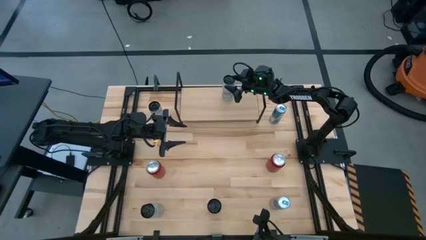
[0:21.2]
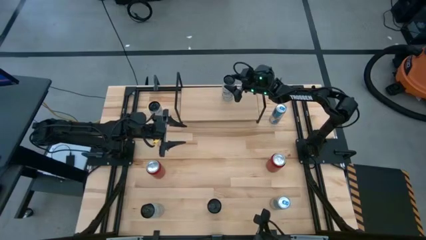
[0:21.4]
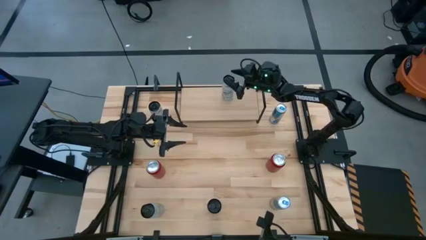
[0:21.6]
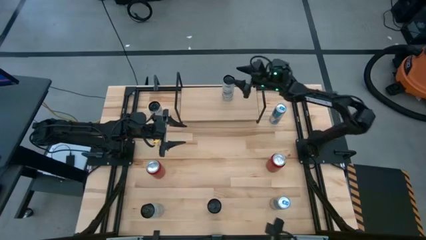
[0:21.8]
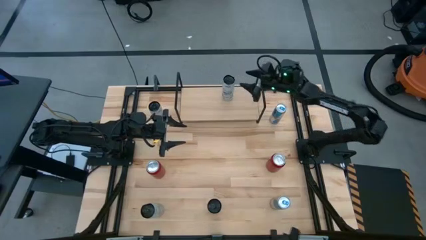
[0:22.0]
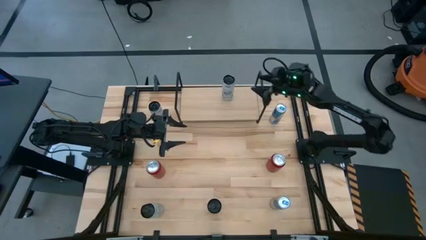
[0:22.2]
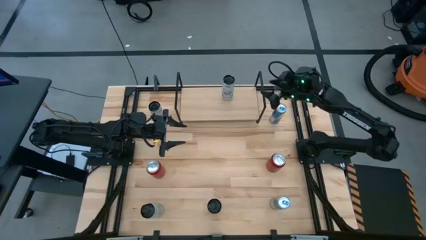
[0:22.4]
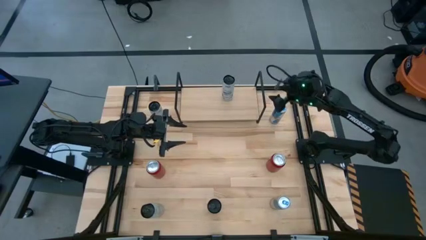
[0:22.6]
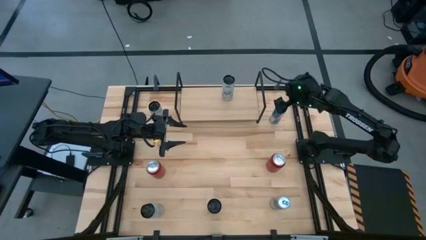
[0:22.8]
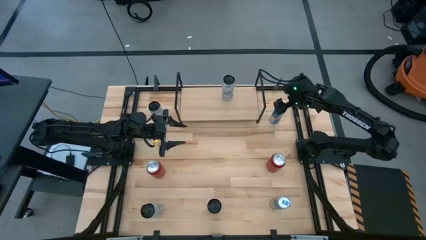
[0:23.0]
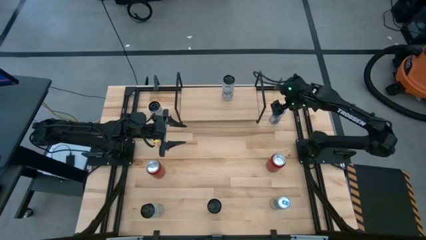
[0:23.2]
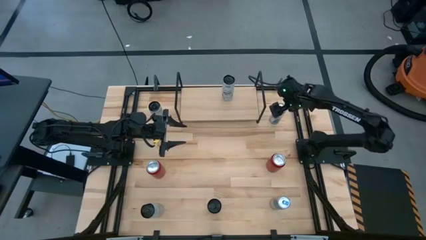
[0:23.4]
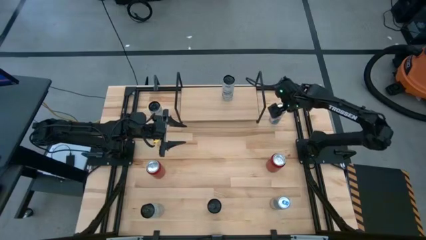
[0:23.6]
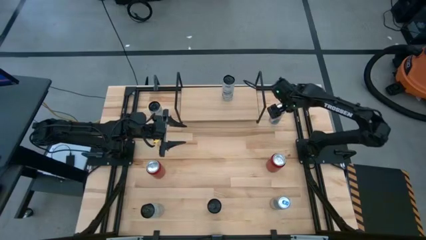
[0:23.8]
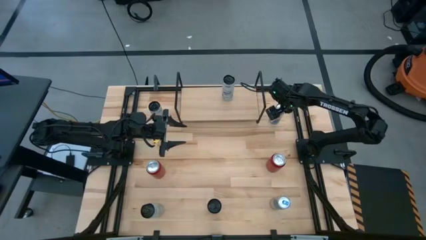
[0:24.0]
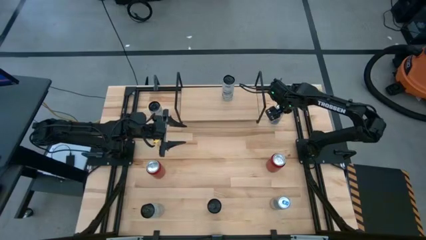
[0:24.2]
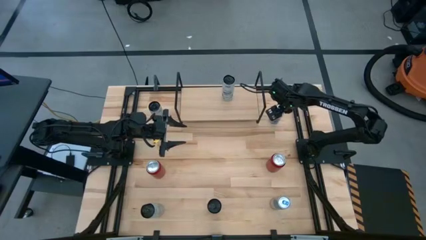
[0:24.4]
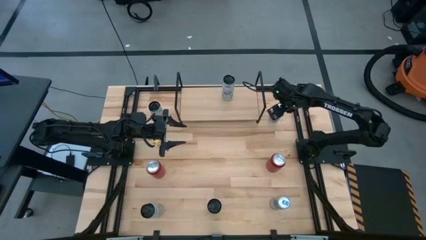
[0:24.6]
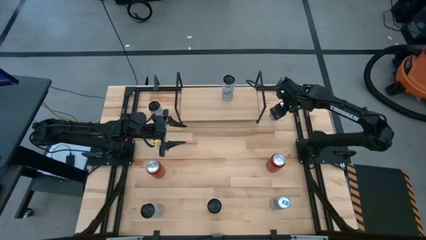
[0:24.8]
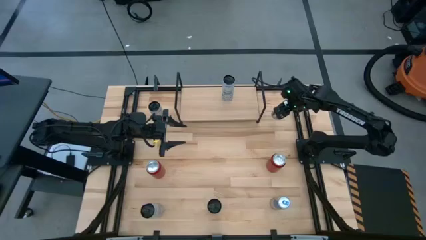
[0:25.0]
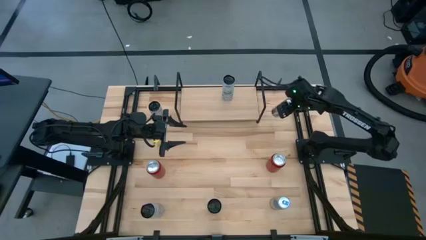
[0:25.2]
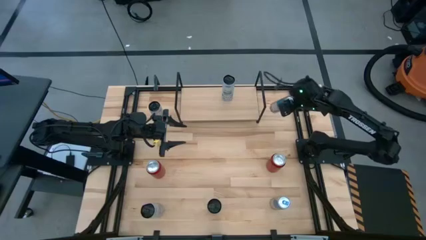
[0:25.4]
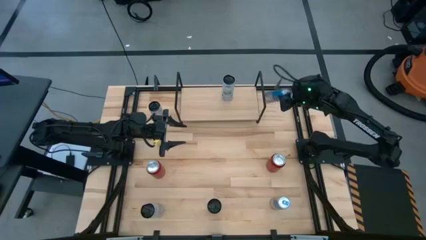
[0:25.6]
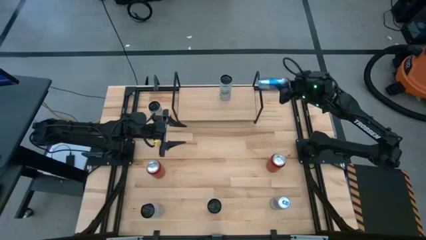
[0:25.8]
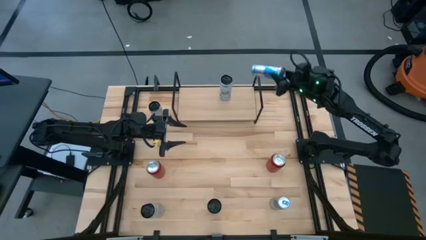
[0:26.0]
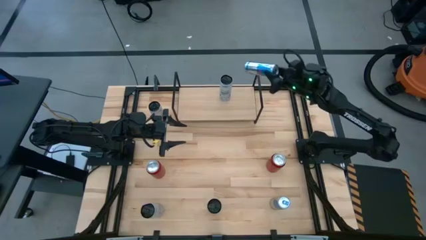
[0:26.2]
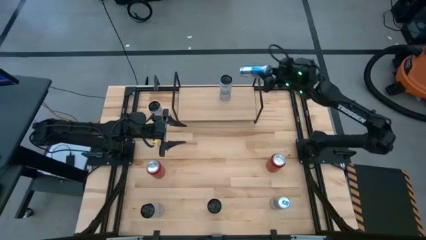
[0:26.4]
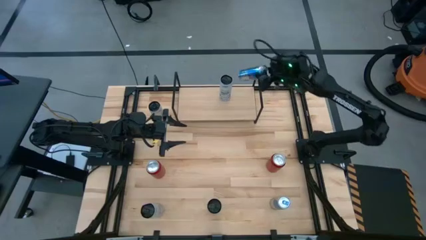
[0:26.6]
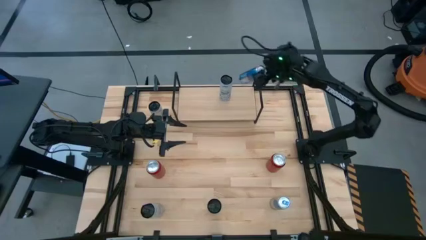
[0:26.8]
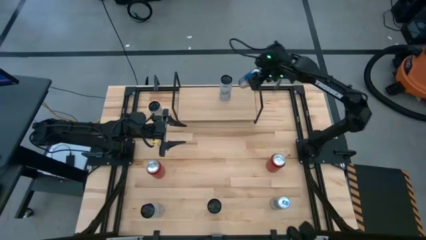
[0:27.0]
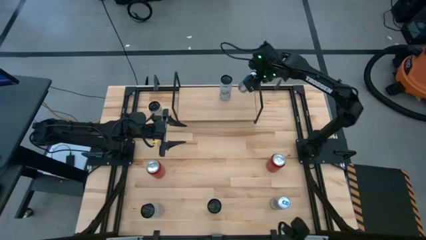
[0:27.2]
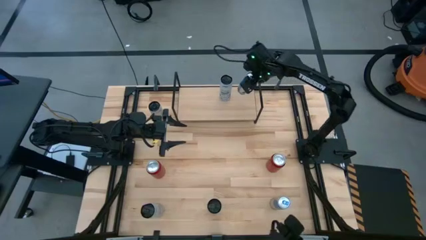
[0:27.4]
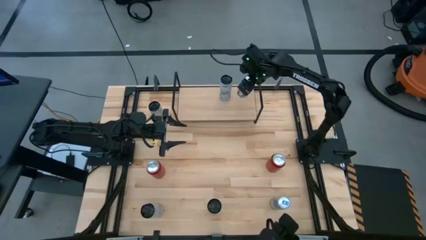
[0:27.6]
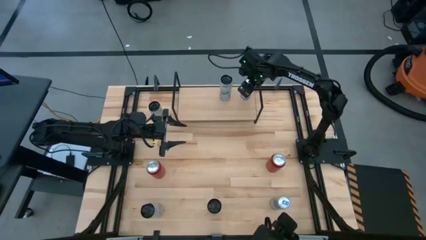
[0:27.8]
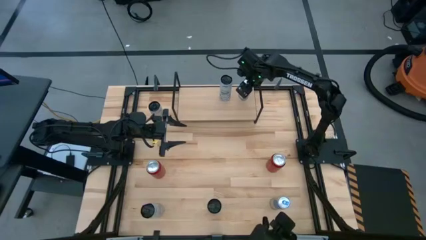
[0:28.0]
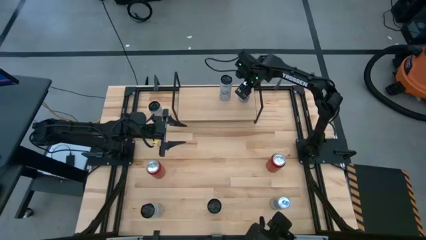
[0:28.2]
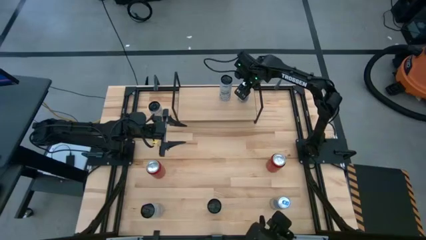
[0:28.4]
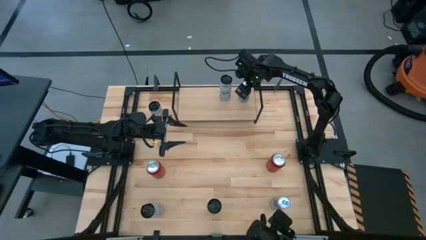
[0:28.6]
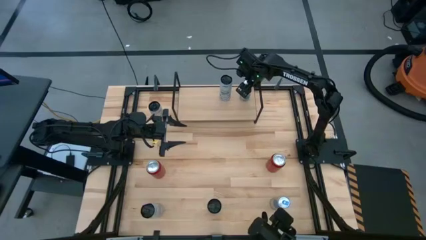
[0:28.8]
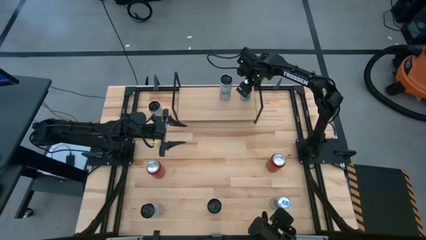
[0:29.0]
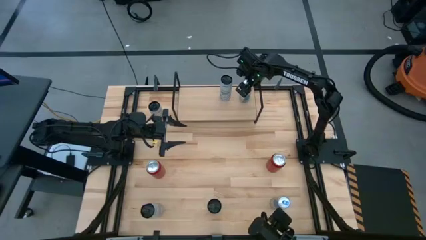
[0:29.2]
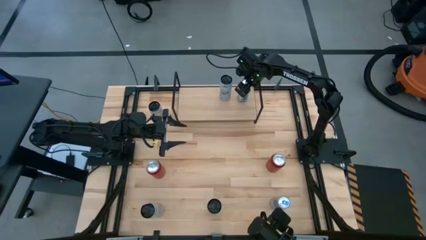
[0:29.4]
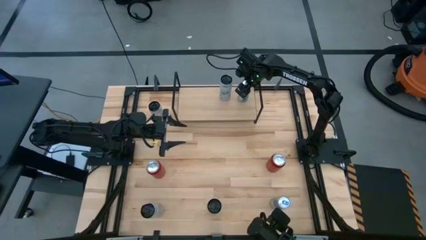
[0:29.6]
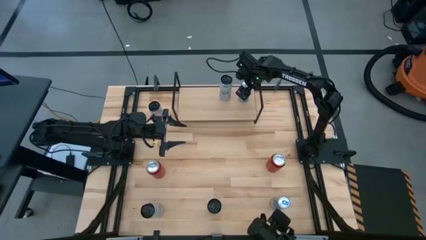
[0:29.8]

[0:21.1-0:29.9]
Task: Place canned beverage on shelf
Put the top blue soda can on the shelf

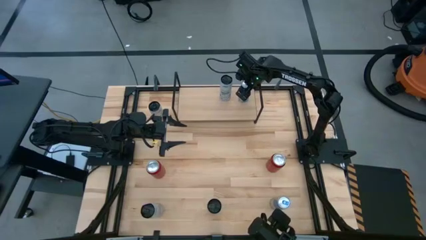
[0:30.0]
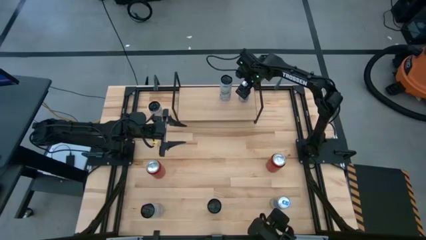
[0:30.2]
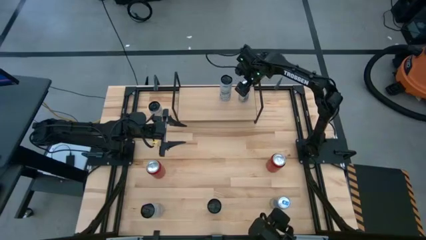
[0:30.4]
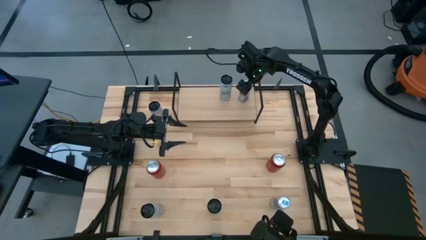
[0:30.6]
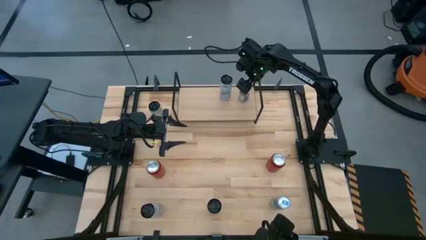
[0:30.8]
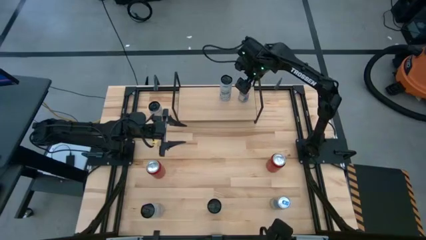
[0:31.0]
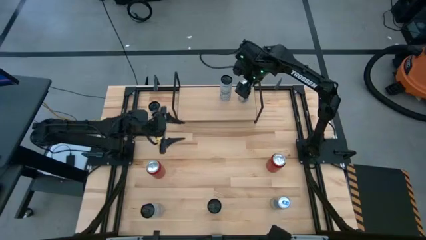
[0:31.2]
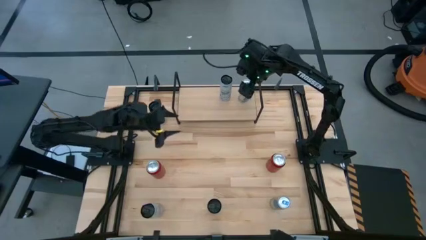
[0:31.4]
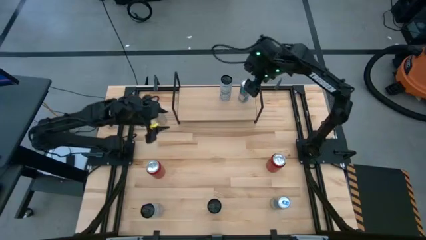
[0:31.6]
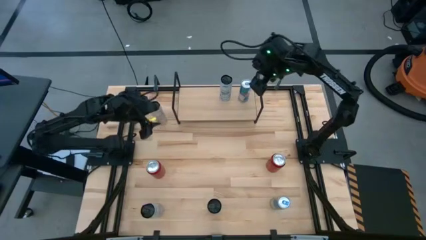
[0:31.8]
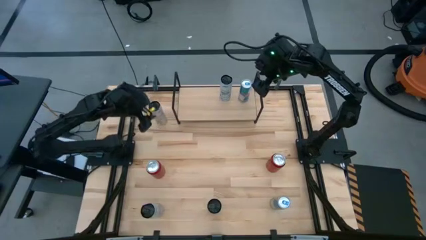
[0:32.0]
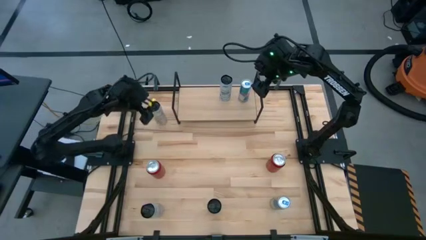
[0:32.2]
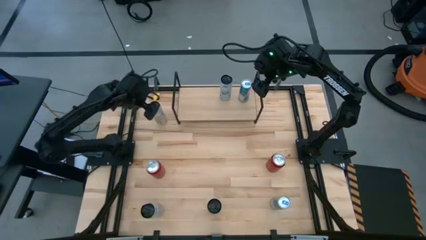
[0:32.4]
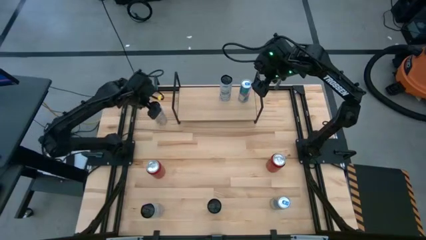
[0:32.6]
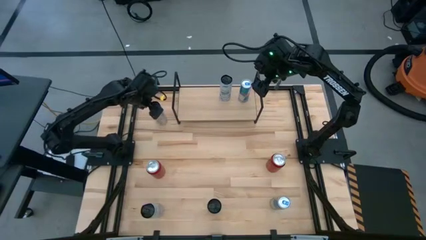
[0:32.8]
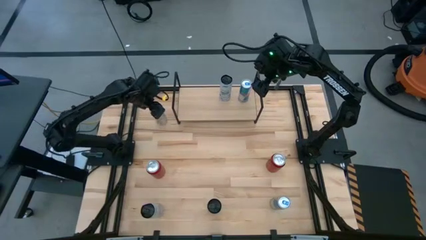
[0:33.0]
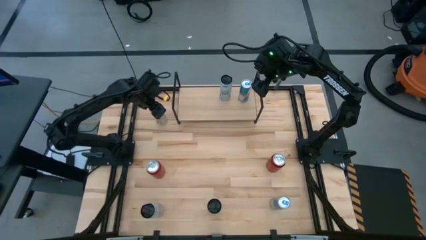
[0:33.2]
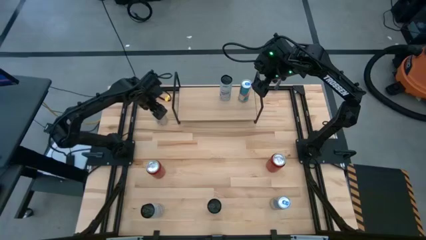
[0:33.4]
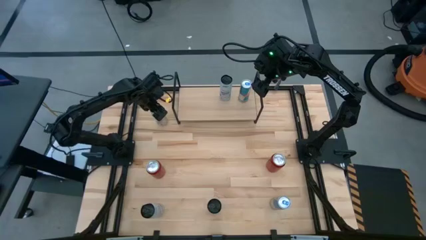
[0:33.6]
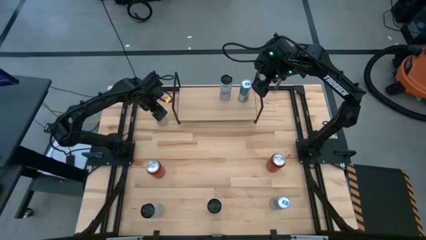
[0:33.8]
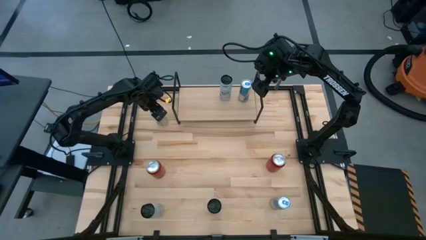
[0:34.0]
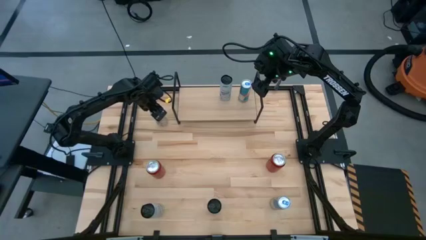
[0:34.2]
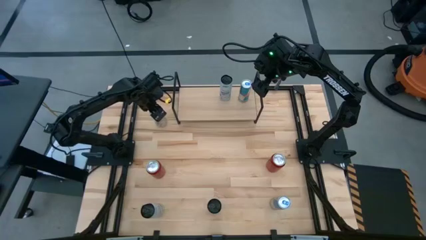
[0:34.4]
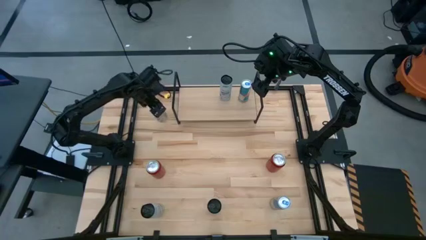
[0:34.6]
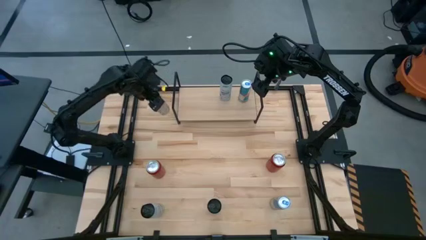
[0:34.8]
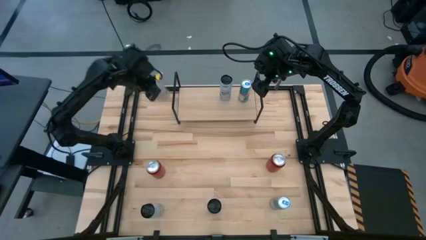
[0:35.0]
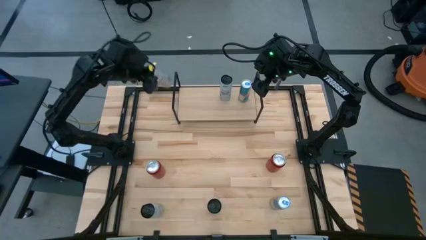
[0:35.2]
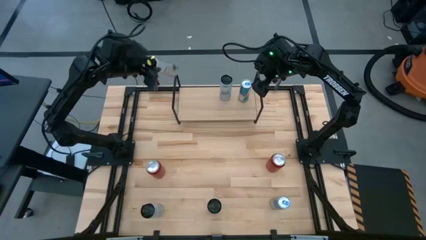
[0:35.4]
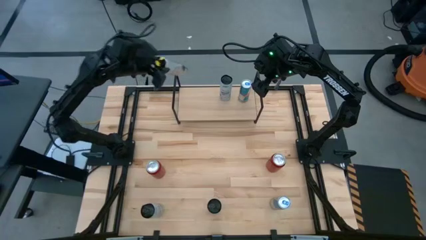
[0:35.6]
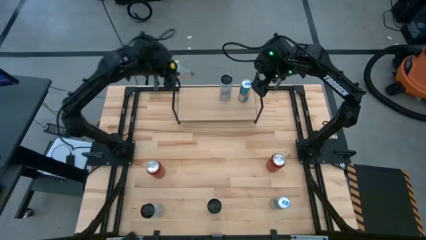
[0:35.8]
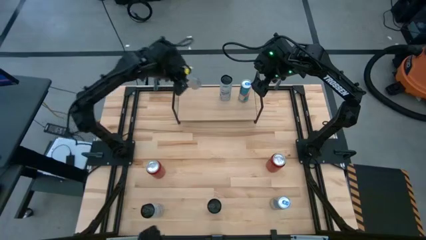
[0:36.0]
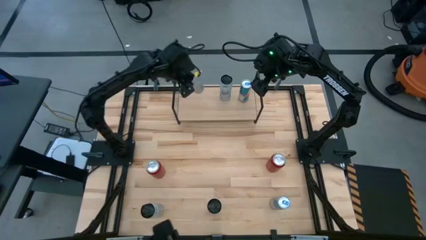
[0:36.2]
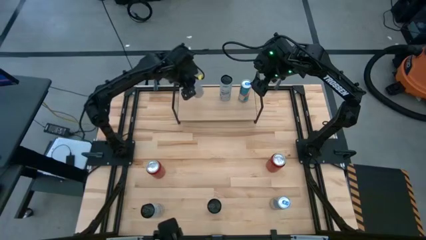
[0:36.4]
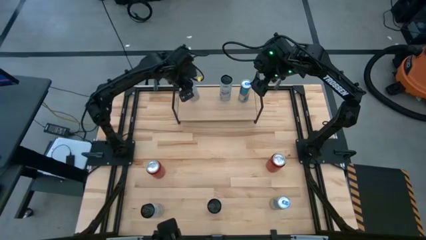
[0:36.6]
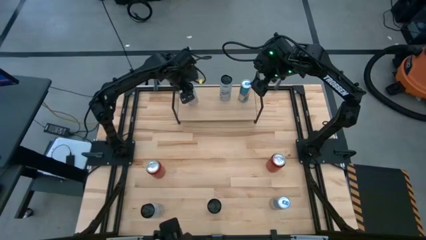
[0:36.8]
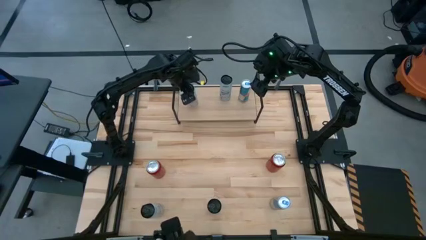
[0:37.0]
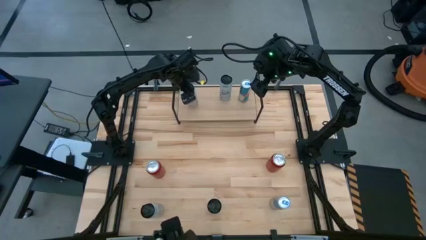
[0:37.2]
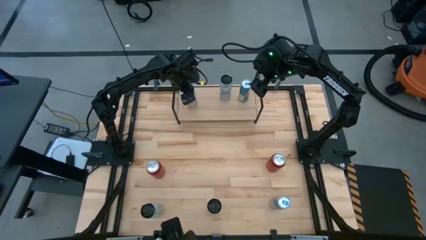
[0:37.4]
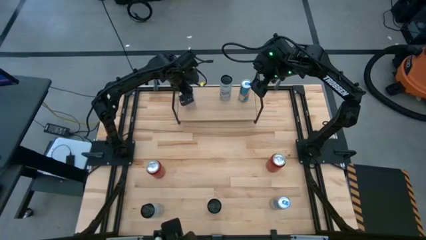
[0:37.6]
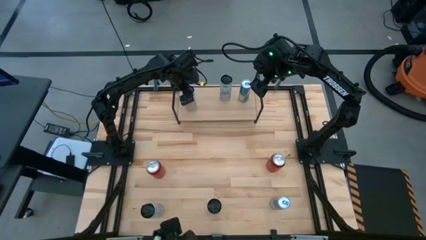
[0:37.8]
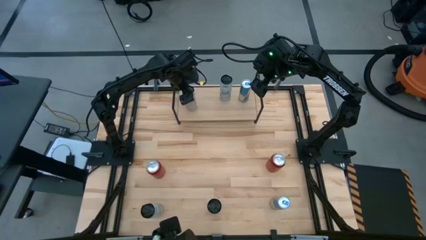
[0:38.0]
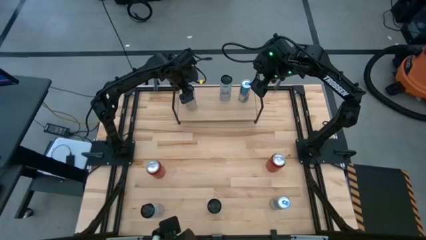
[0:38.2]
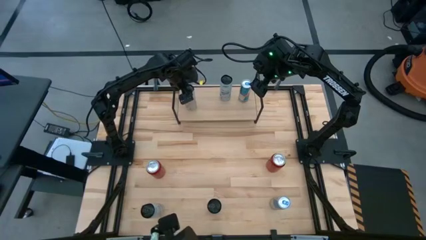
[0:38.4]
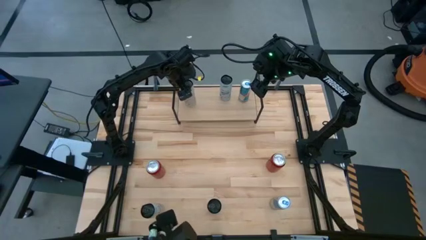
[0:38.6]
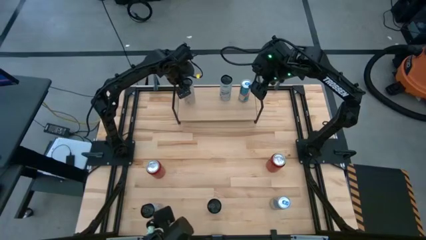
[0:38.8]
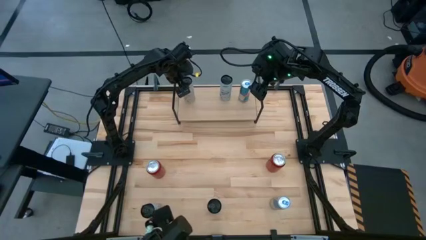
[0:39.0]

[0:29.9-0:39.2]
Put the left orange soda can on the shelf
